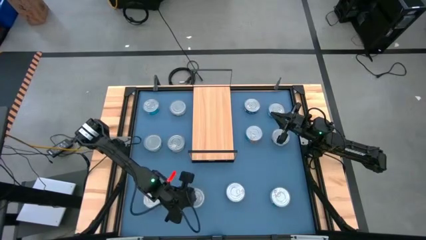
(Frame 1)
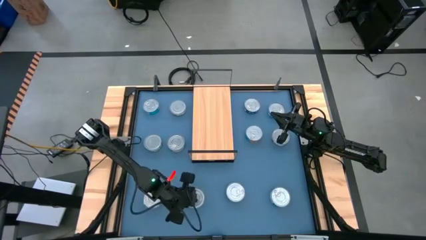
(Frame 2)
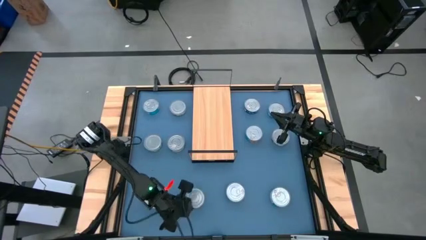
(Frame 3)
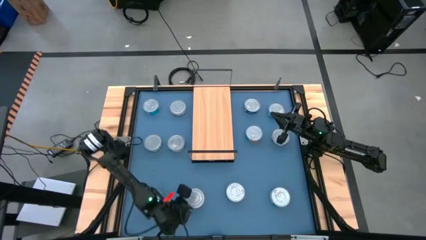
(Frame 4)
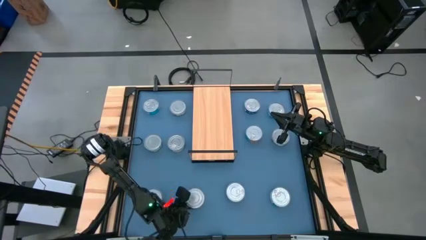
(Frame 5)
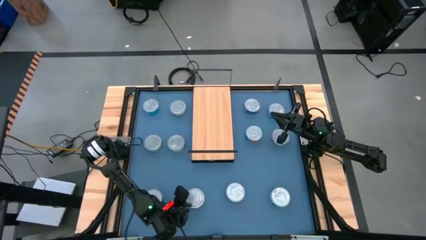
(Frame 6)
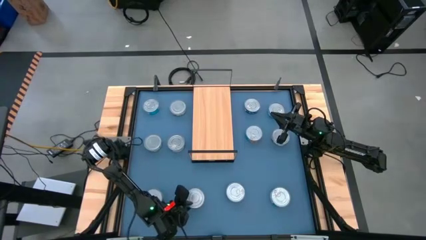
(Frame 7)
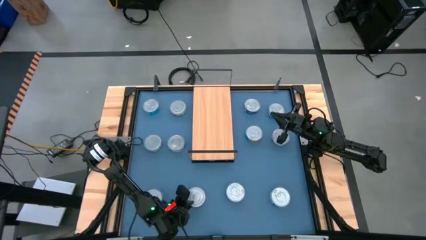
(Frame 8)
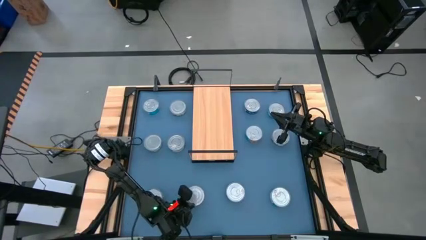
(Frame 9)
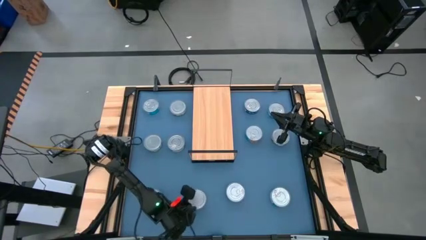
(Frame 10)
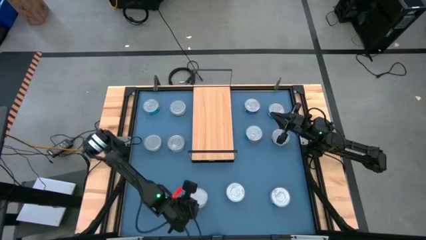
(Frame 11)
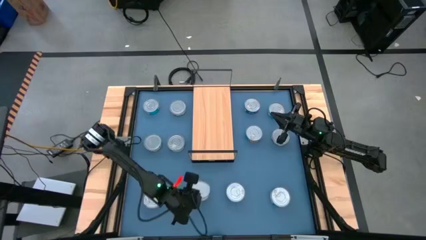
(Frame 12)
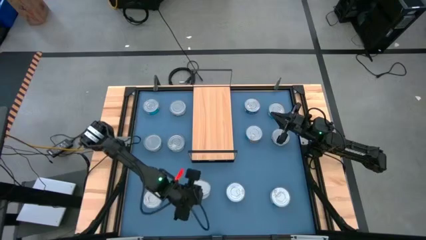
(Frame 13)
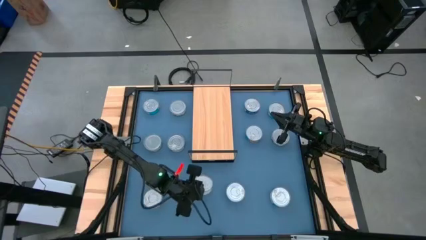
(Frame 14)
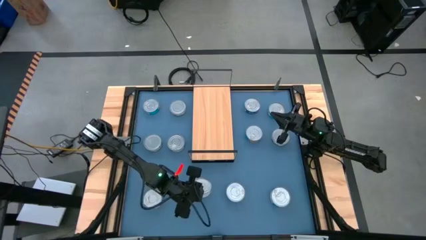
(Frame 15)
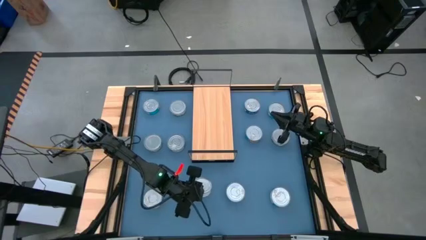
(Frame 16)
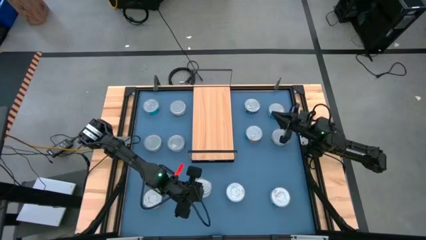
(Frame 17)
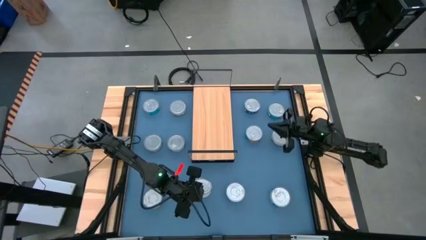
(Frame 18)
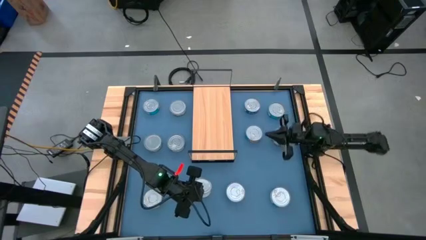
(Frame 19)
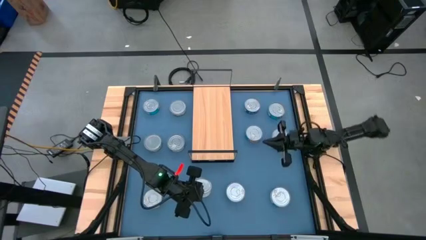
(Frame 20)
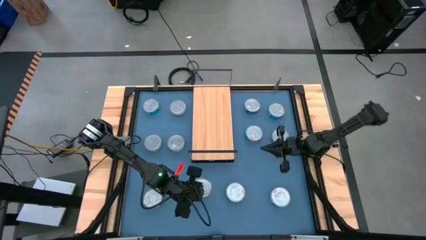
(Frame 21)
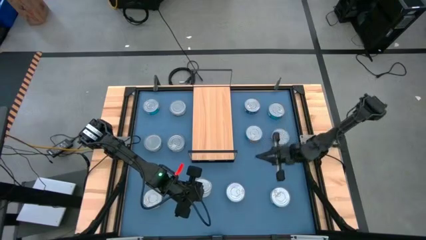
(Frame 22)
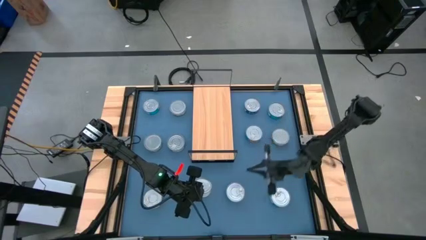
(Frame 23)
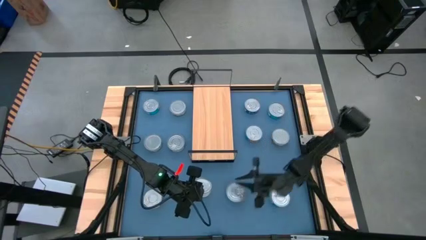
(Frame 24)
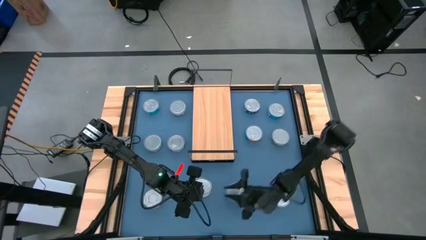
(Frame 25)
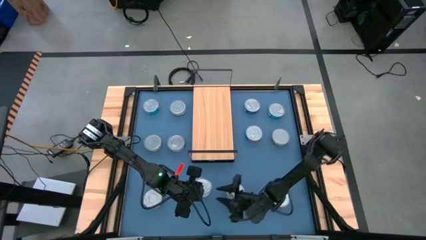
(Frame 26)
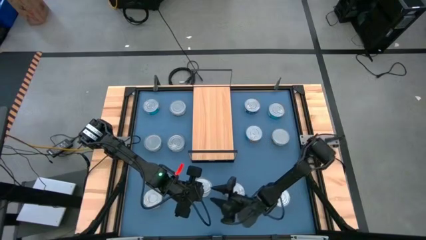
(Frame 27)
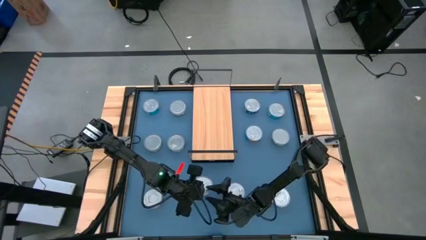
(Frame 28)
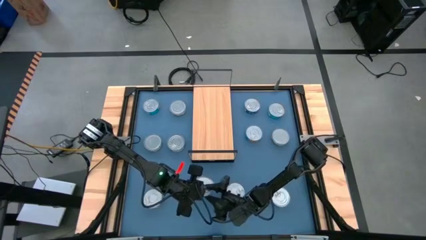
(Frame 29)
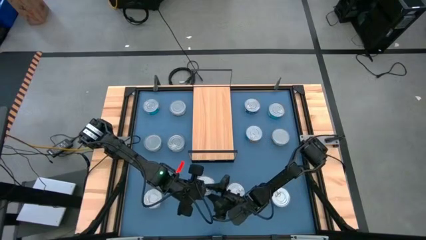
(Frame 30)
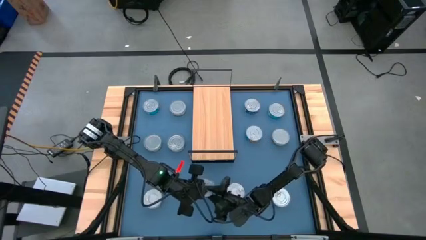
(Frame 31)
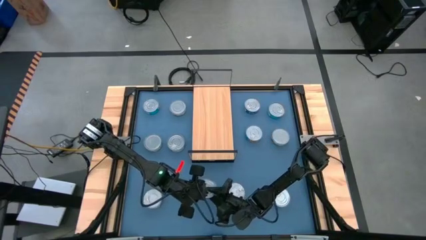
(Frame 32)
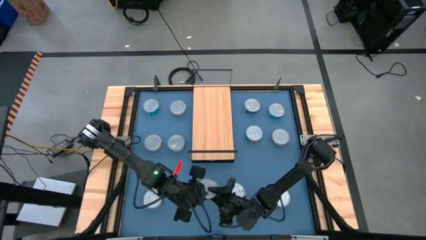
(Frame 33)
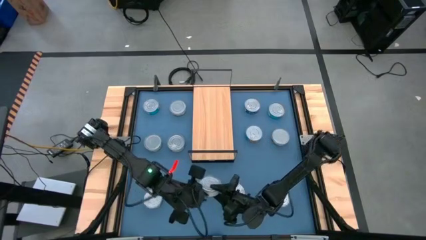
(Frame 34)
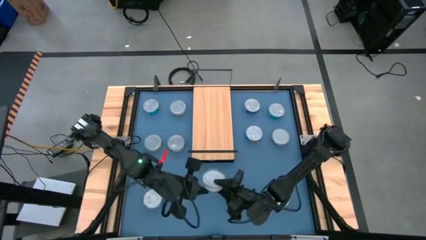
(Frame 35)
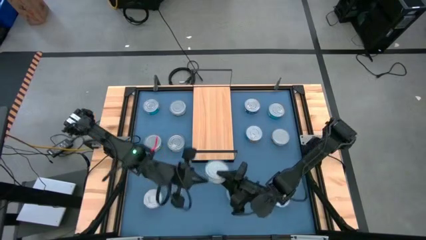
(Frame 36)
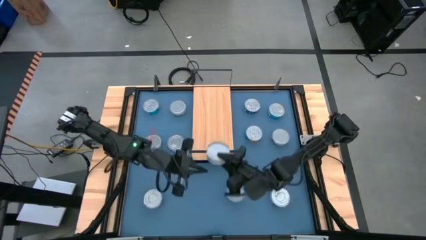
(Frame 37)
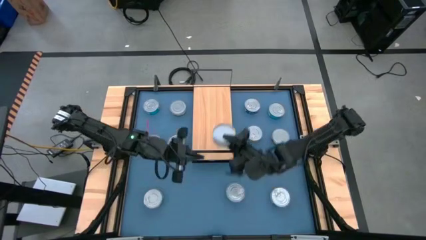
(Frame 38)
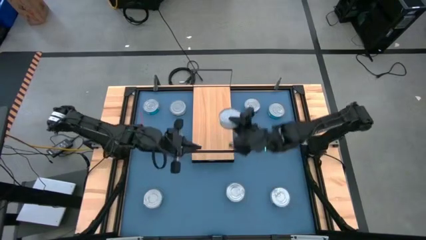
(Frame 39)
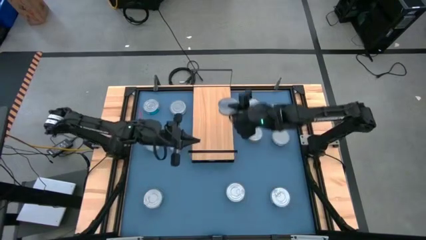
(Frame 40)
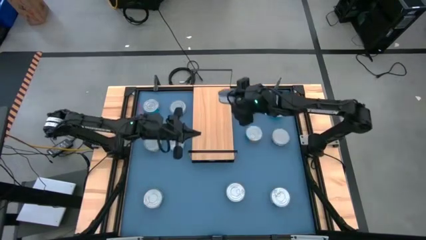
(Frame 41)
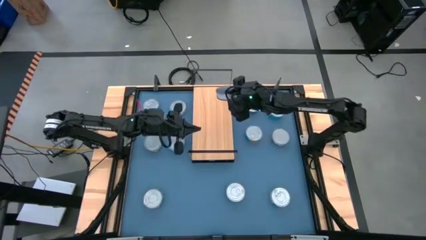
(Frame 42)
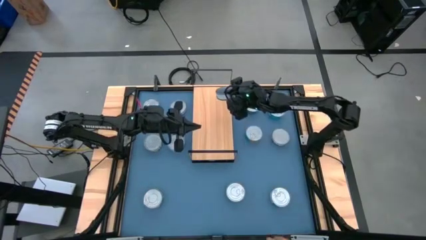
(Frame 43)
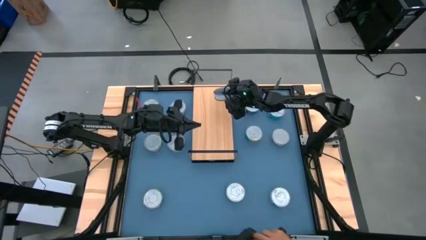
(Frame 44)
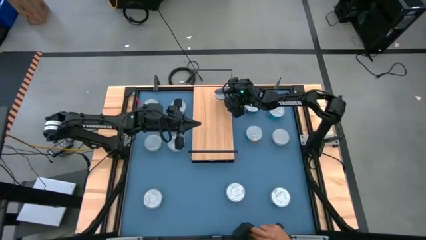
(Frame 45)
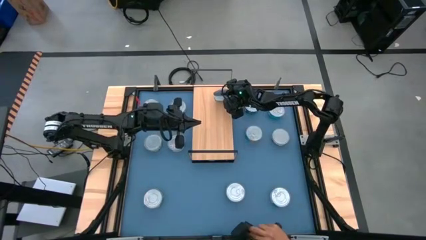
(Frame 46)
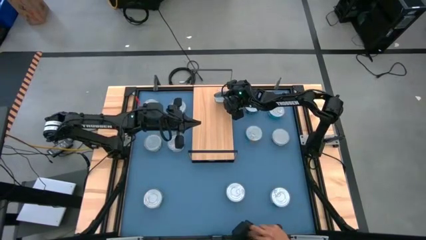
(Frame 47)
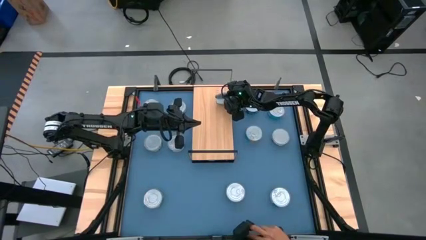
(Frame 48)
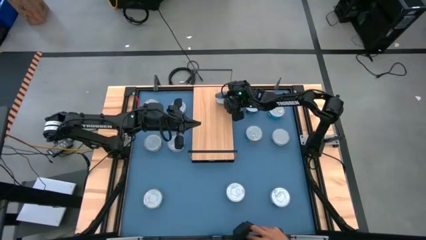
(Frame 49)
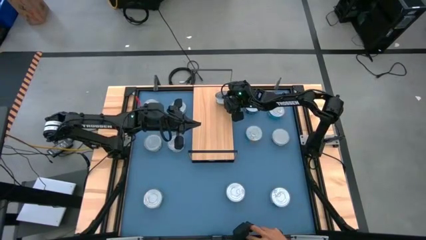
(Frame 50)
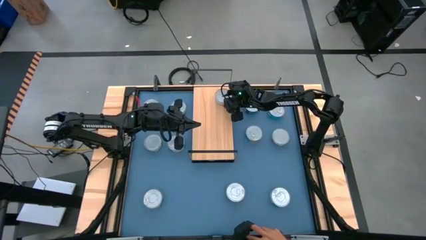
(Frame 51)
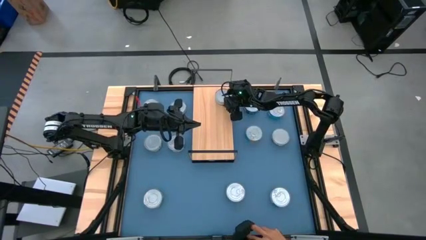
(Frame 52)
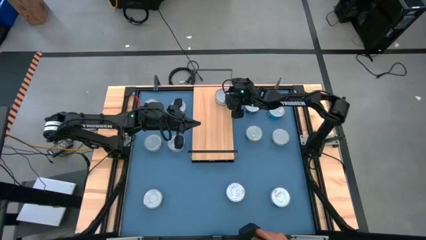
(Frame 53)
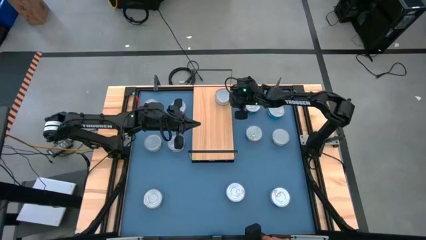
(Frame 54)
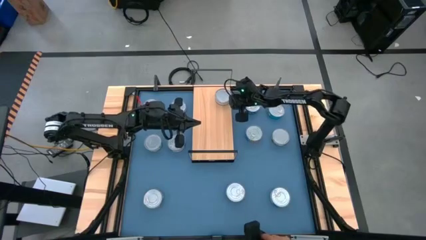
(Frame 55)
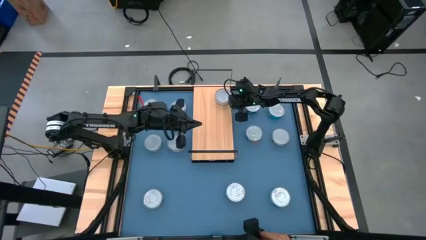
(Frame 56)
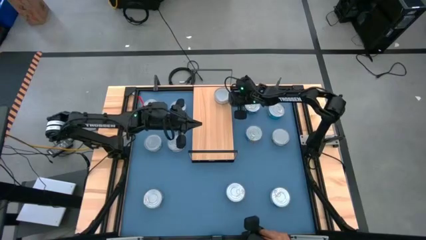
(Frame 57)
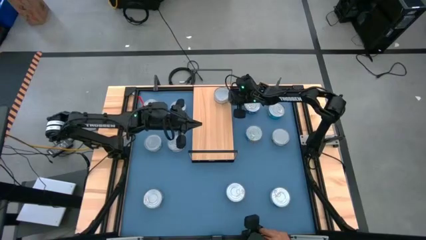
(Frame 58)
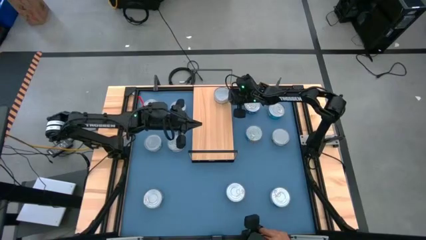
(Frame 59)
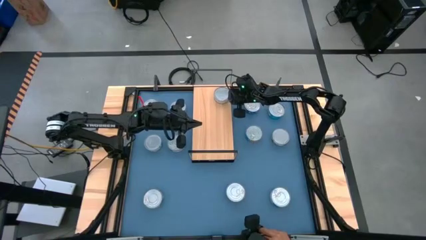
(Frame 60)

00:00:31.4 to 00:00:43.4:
Task: Stack canned seafood by type on shelf
Put the green tuna can on the shelf
